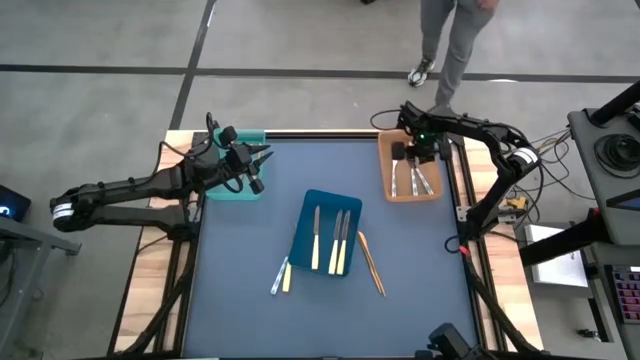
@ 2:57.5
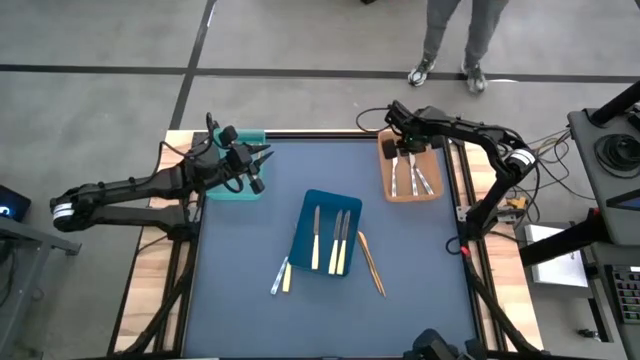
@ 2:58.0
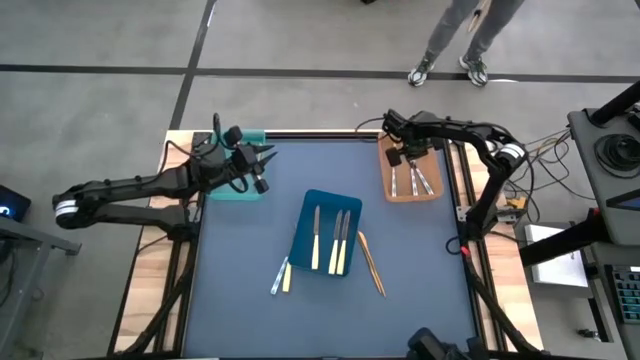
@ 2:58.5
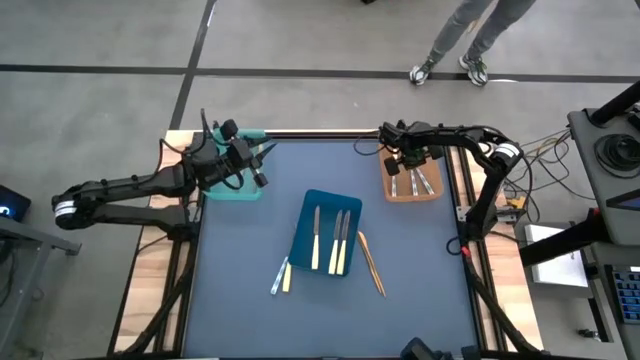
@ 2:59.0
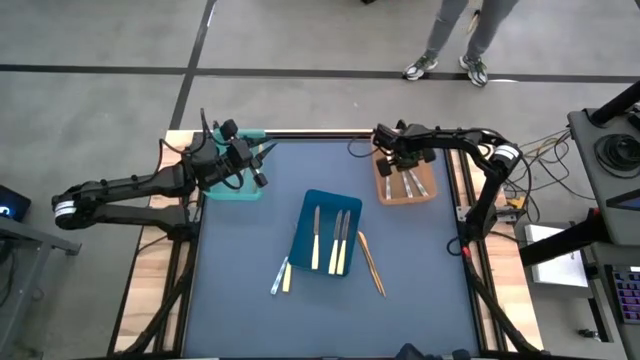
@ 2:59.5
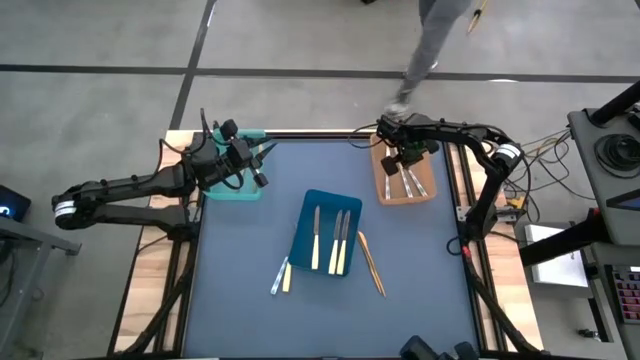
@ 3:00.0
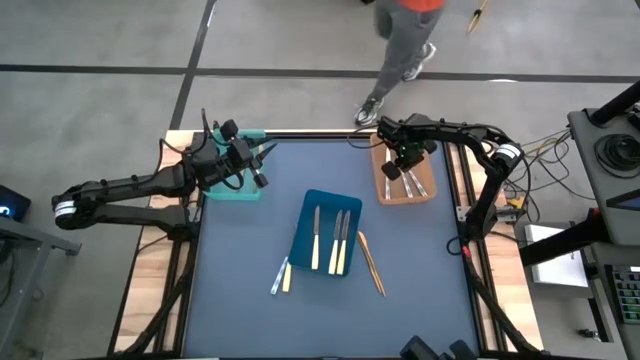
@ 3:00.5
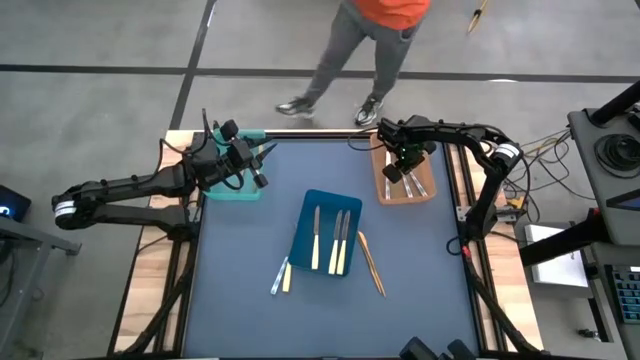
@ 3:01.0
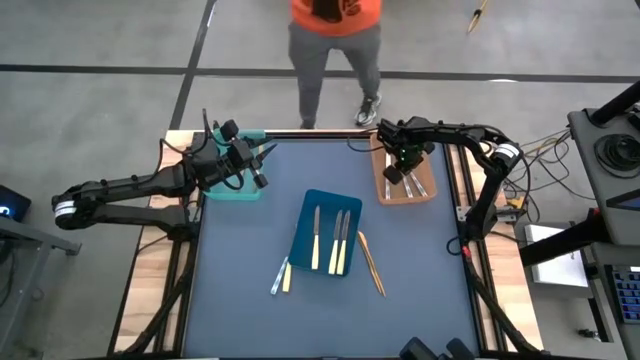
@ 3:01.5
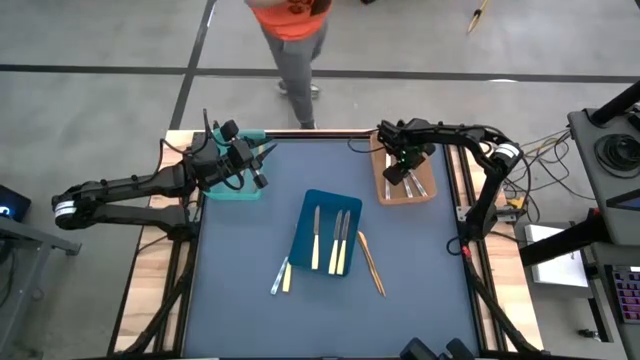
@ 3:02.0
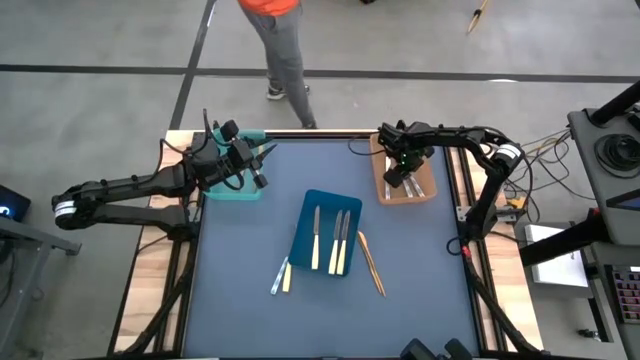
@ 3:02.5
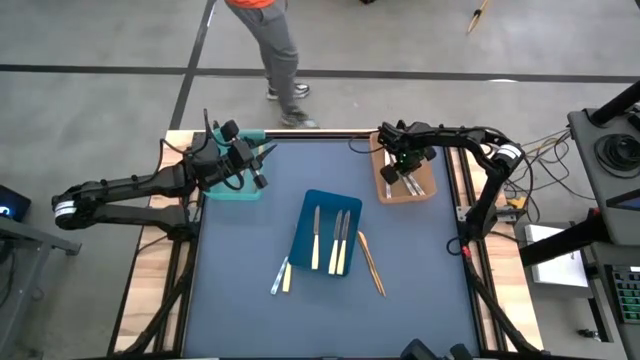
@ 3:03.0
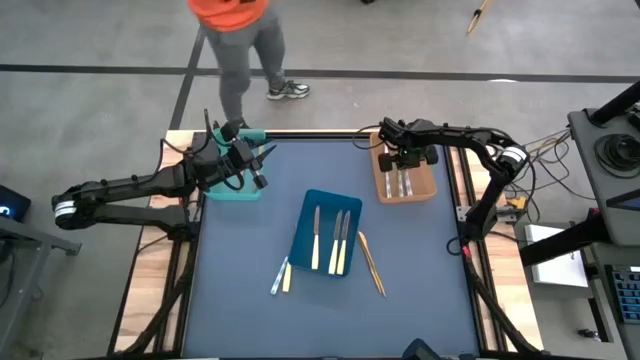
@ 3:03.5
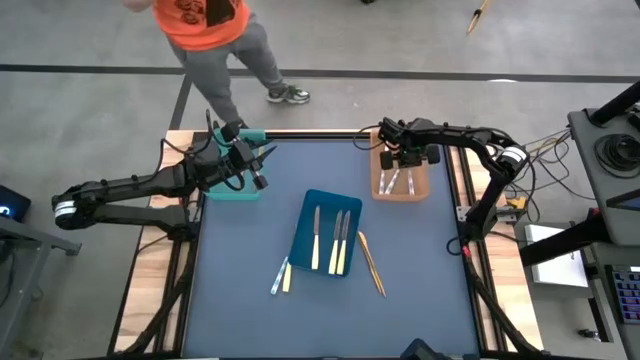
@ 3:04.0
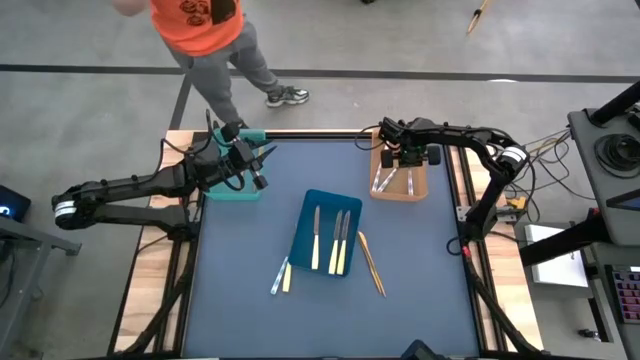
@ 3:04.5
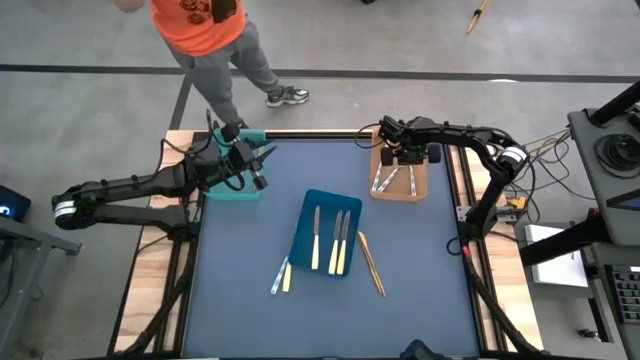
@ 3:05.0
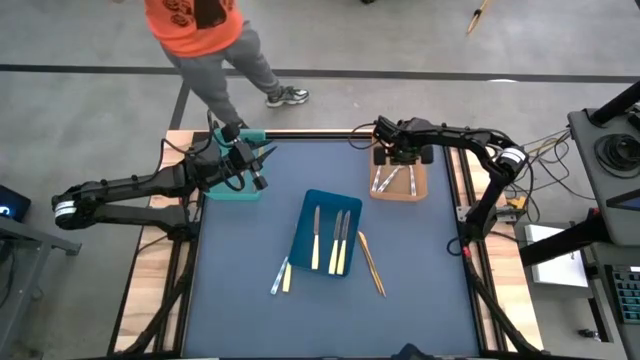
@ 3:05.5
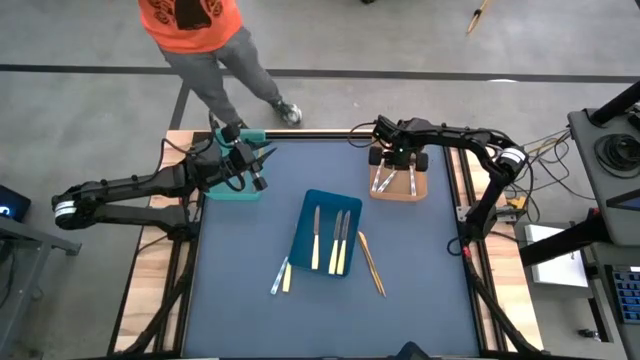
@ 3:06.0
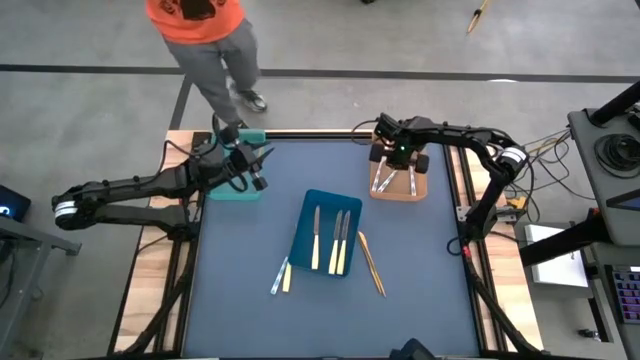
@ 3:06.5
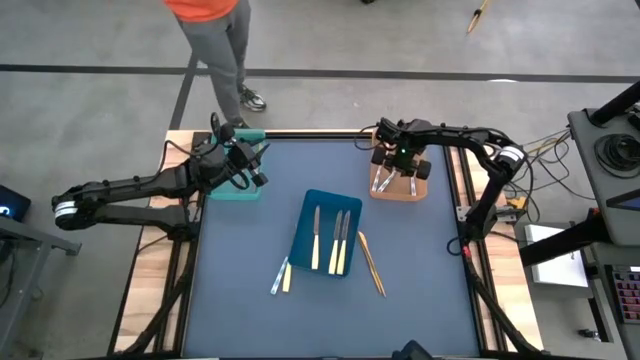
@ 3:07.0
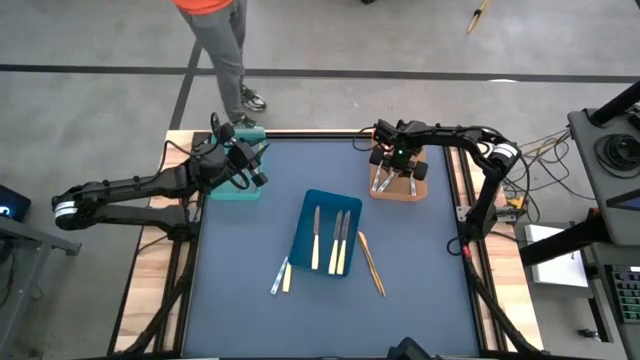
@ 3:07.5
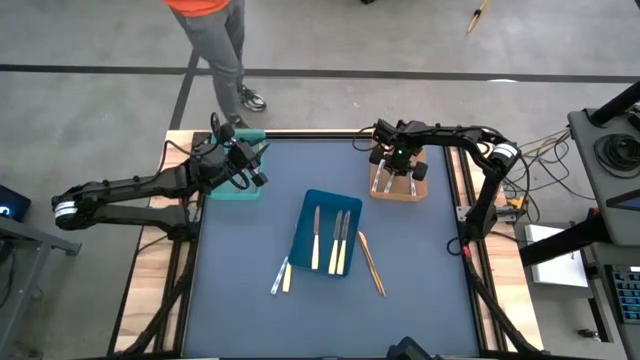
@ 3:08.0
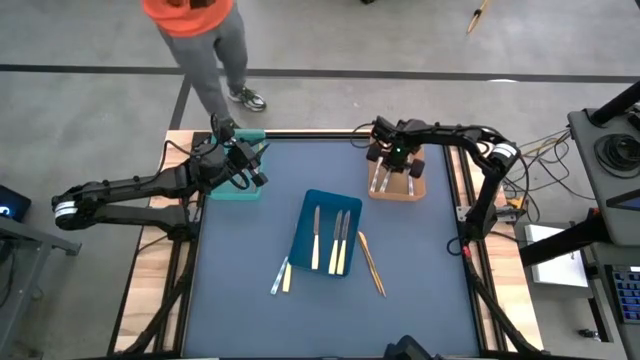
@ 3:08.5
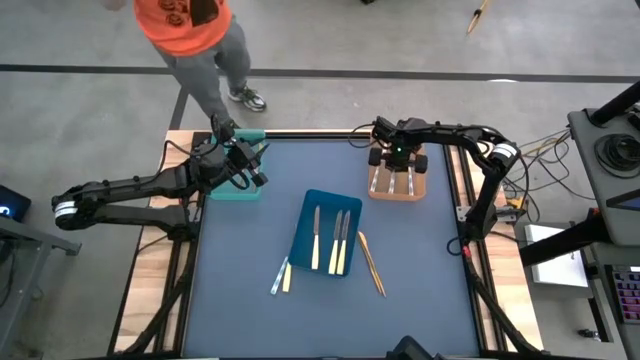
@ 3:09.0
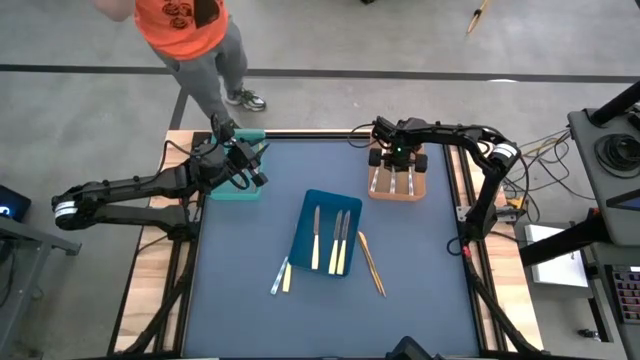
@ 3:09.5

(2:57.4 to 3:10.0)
Task: Sort silverware by color (type)
Put the right blue and white knife into the orange bin

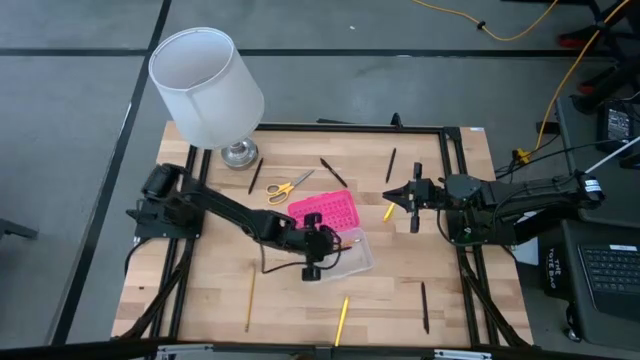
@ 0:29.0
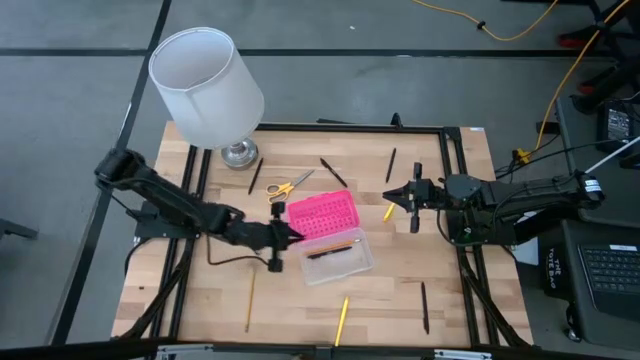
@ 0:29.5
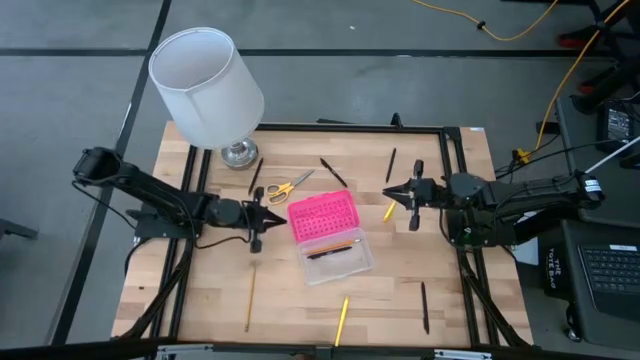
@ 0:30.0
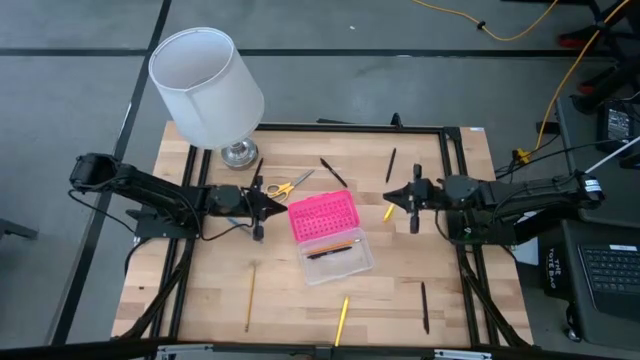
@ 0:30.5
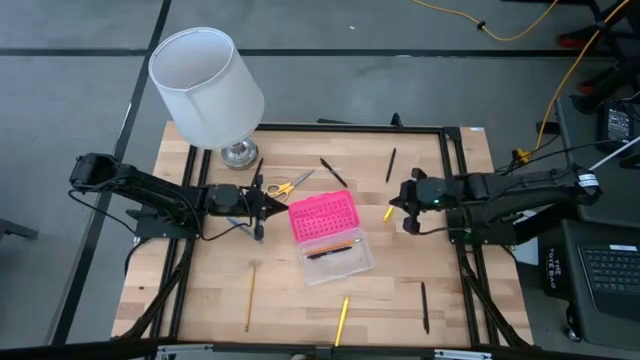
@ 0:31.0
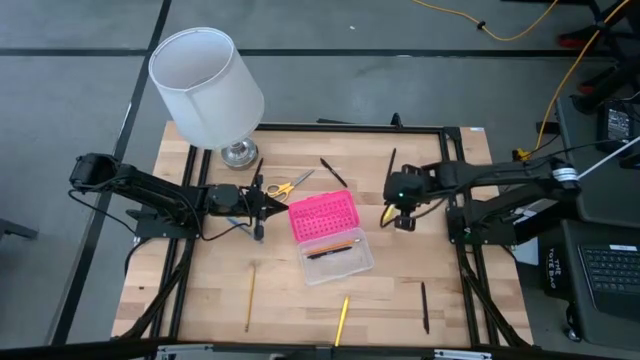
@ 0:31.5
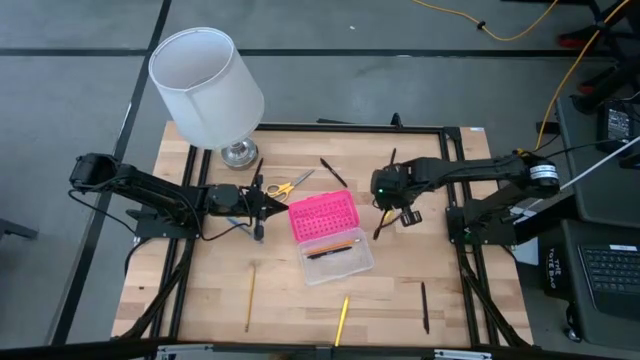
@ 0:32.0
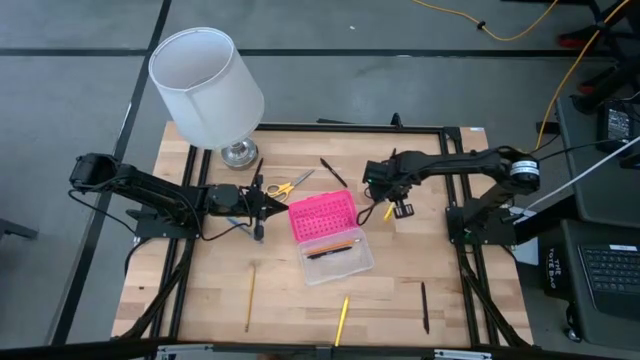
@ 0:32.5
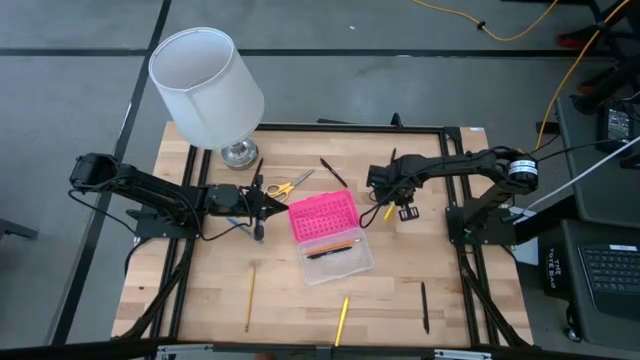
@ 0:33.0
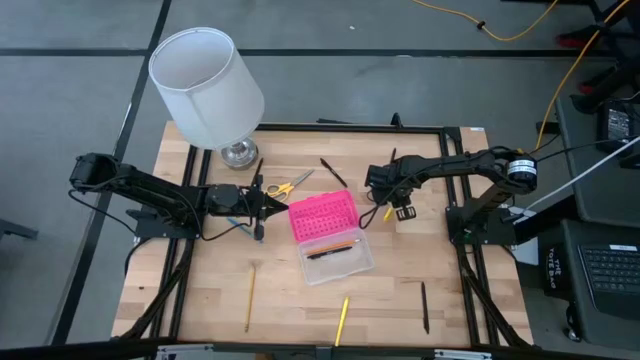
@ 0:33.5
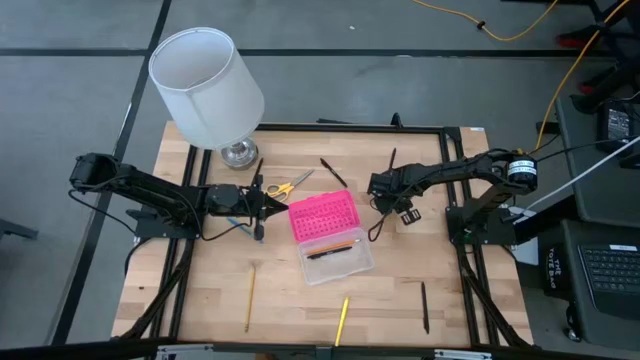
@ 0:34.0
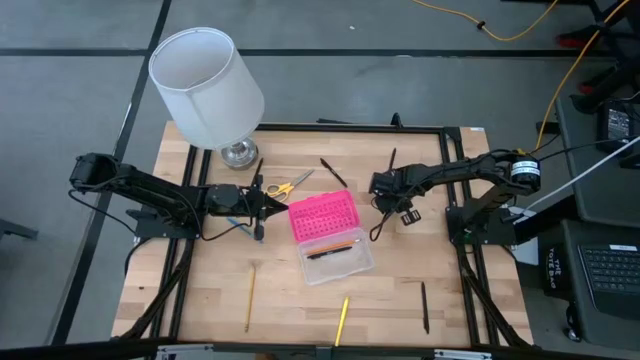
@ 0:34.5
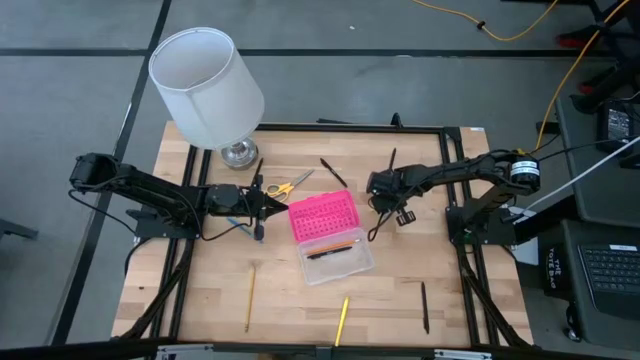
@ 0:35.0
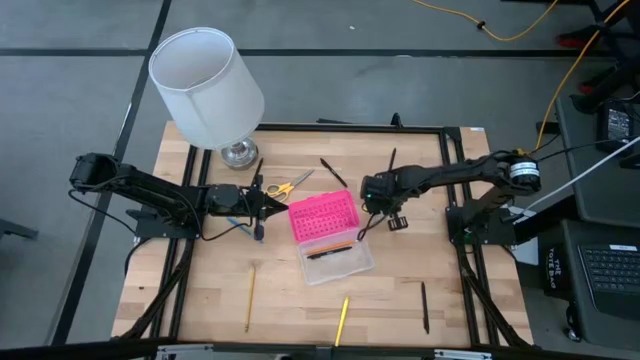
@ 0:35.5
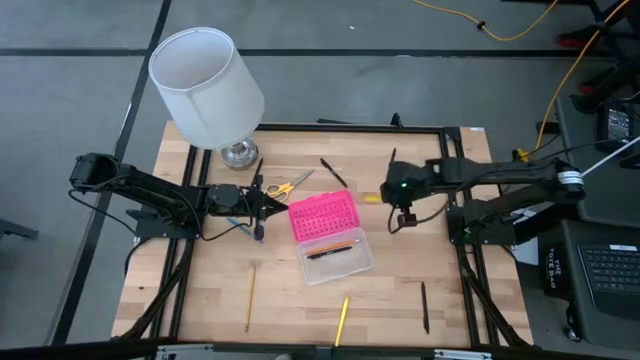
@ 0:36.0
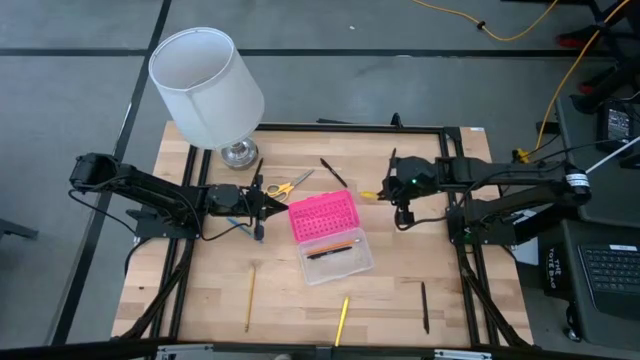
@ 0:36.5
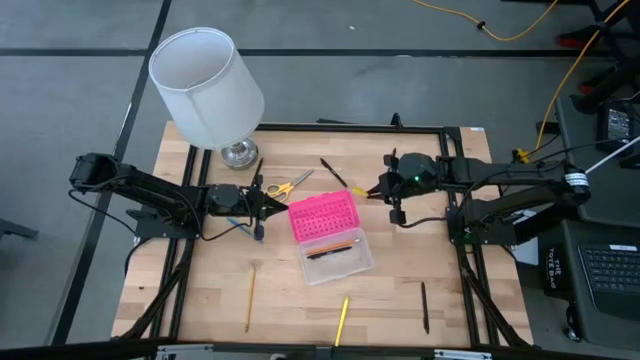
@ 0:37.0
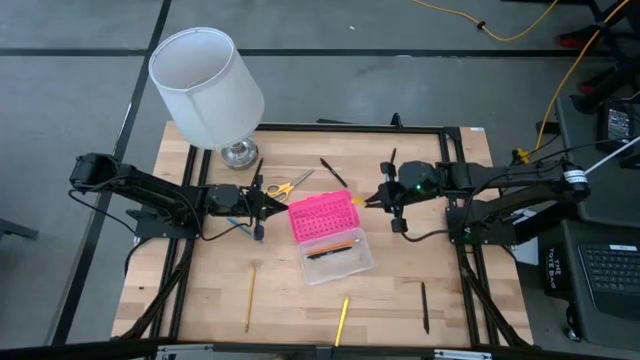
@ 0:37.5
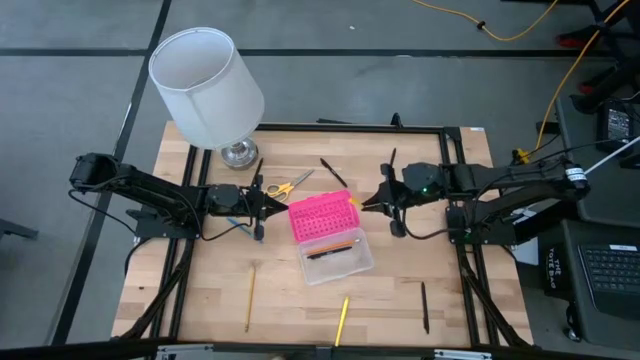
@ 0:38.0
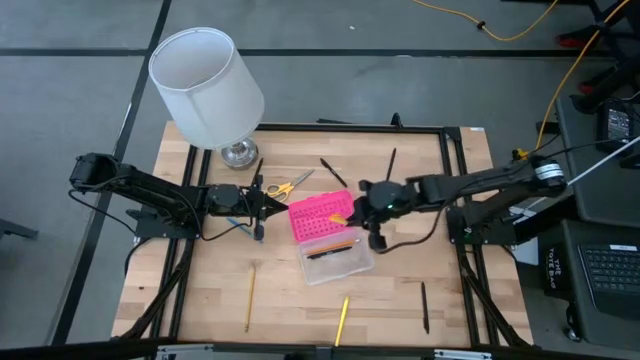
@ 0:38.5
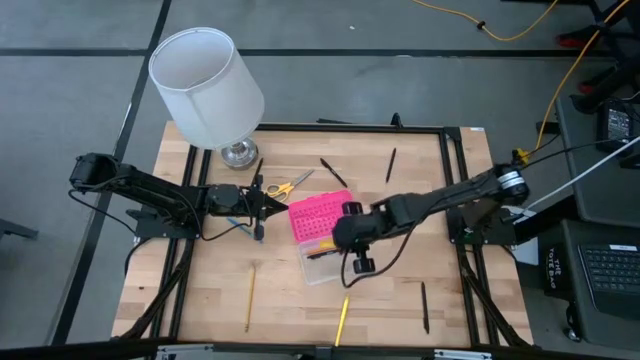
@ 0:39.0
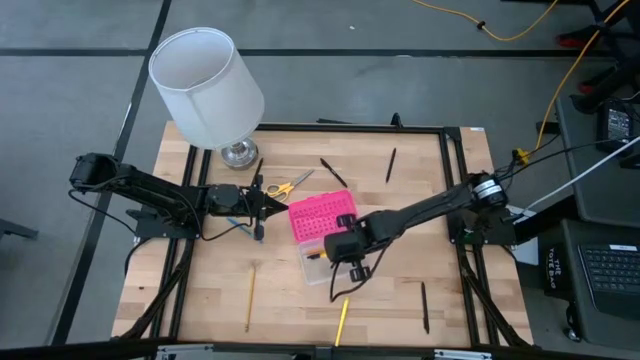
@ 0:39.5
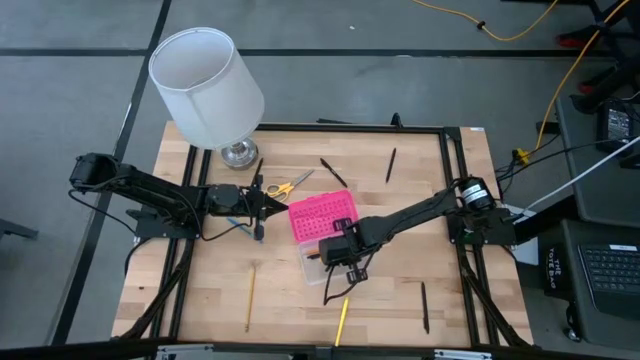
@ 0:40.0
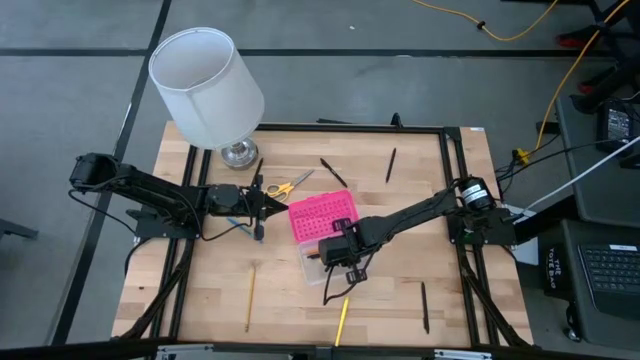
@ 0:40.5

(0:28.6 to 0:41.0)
Task: Pick & place school supplies into a supply box
Put the yellow pen into the pink supply box
